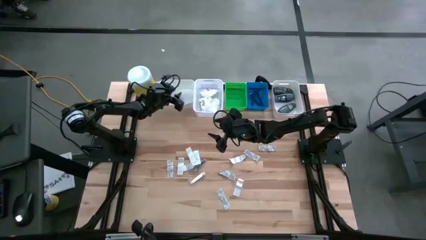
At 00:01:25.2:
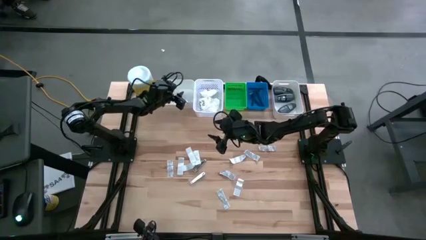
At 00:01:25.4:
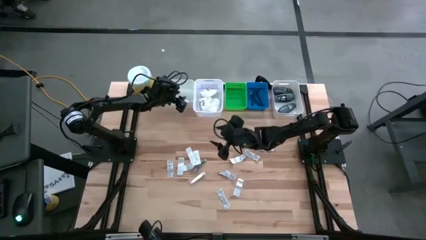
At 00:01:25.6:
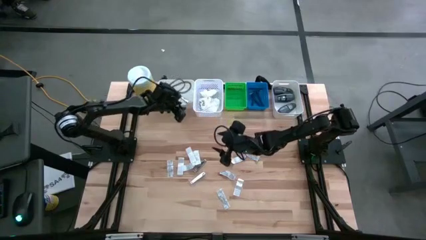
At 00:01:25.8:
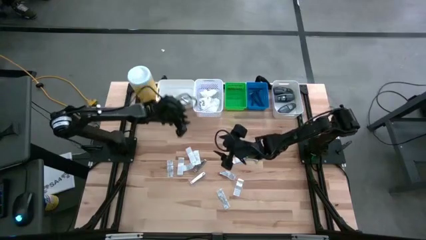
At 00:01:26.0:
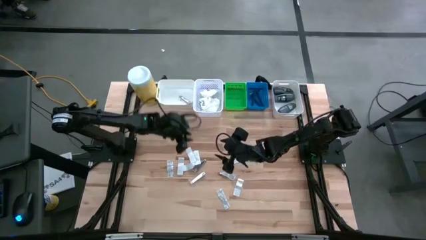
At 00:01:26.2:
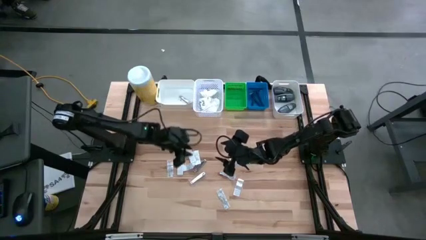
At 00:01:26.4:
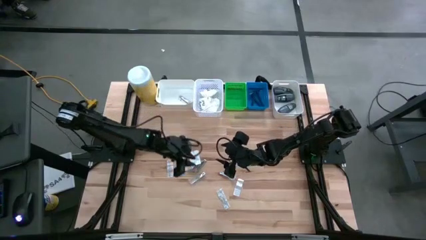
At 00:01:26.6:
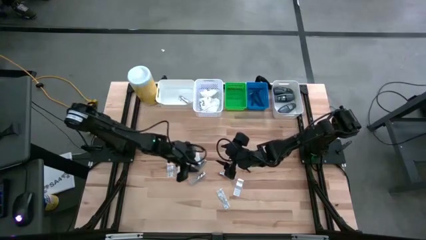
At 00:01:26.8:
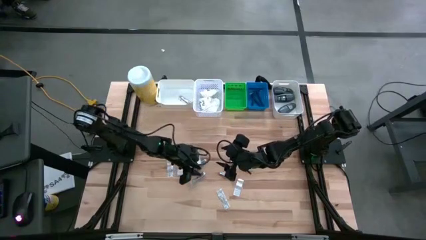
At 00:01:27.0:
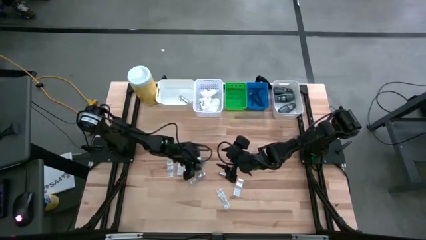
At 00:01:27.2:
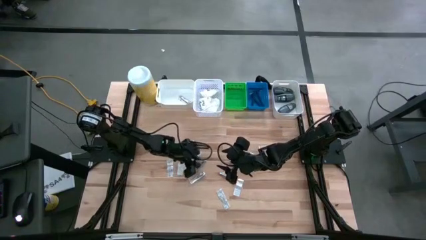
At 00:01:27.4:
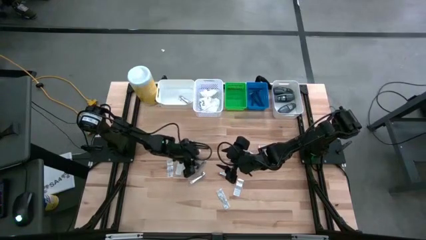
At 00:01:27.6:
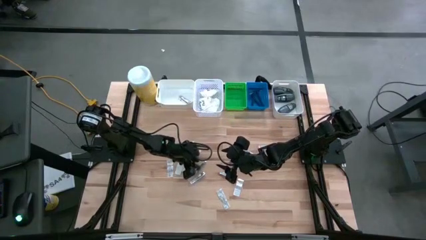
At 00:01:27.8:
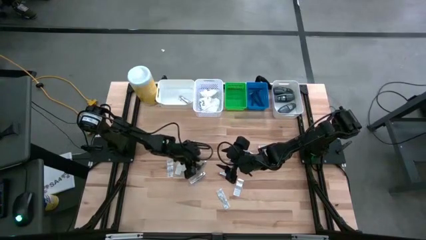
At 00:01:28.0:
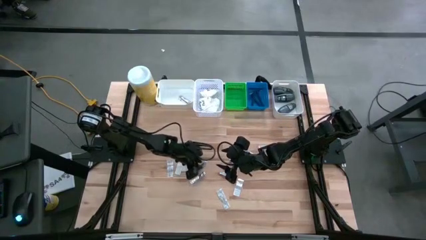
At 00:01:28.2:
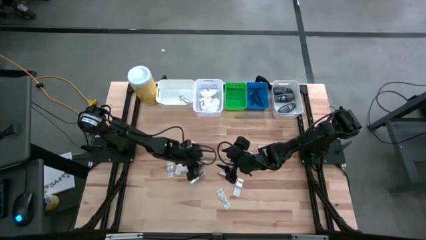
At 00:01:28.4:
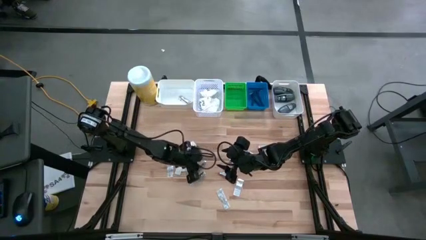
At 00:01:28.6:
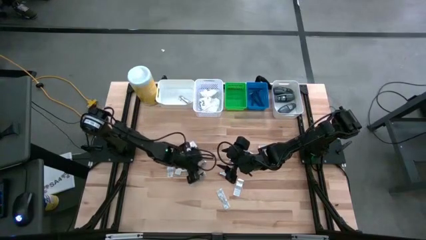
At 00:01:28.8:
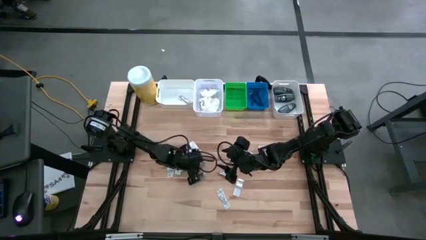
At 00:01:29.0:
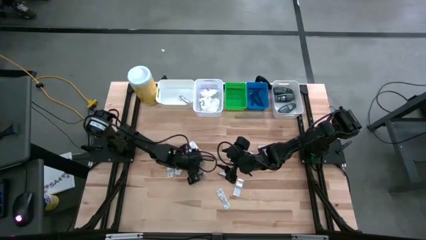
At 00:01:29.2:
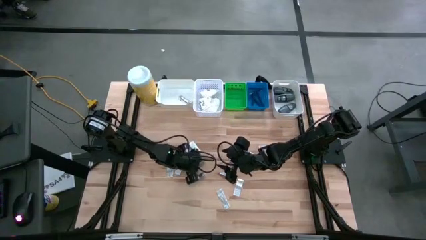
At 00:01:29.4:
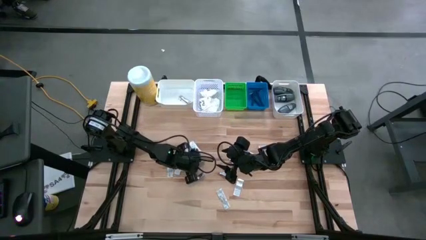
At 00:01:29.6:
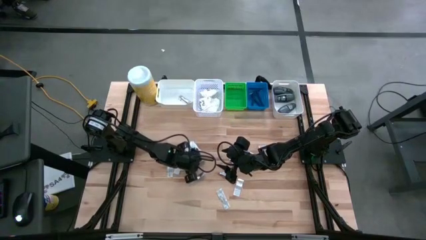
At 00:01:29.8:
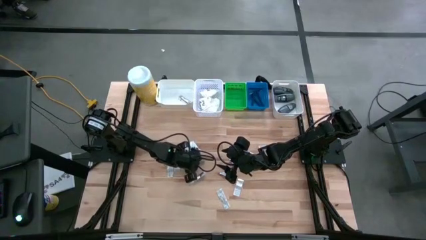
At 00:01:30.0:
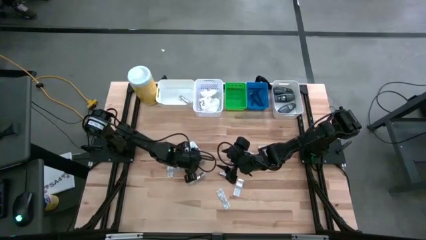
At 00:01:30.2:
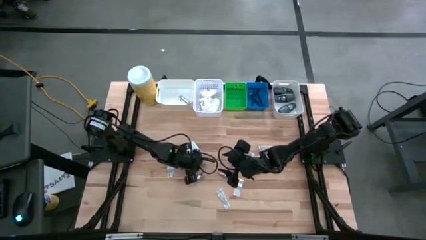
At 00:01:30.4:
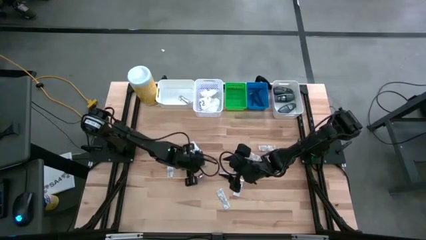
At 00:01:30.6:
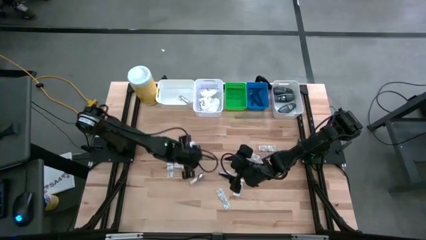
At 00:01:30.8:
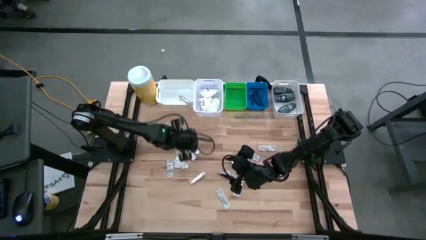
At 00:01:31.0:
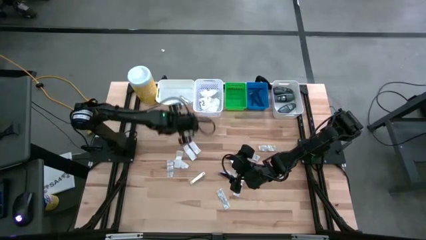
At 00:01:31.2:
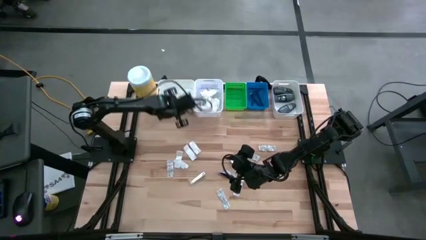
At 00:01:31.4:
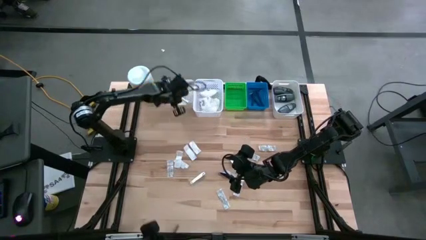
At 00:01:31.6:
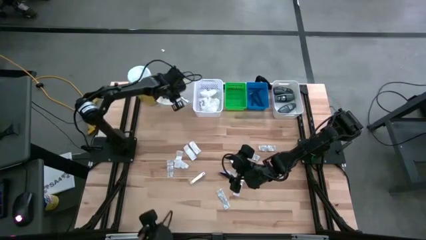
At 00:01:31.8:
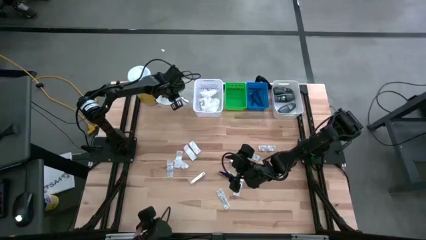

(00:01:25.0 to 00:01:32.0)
Task: Pick & Place Travel size toiletries
Put the silver nail cutter into the left white bin

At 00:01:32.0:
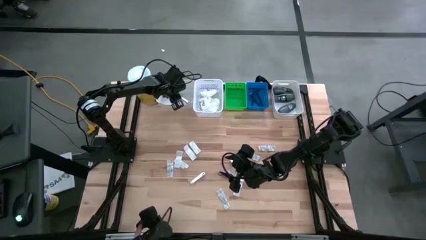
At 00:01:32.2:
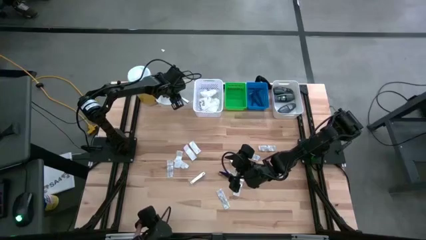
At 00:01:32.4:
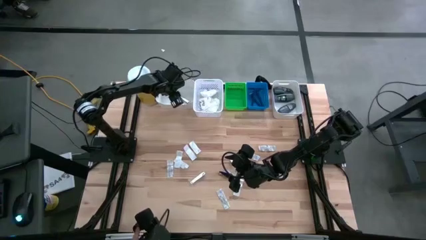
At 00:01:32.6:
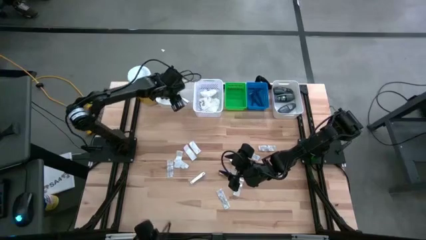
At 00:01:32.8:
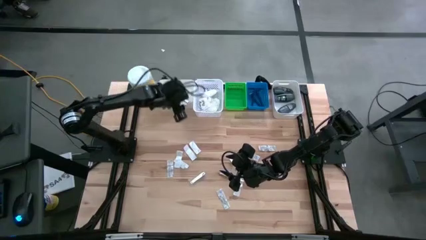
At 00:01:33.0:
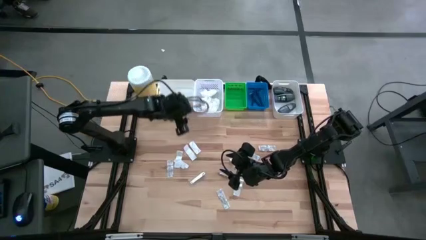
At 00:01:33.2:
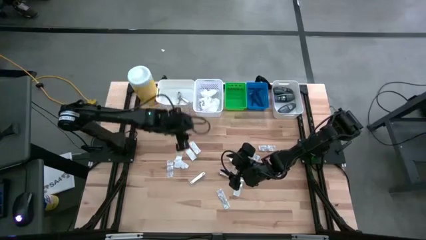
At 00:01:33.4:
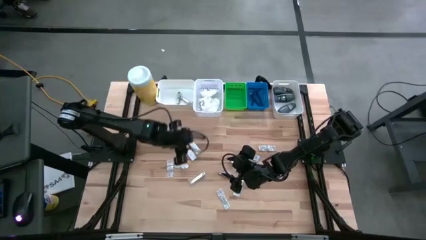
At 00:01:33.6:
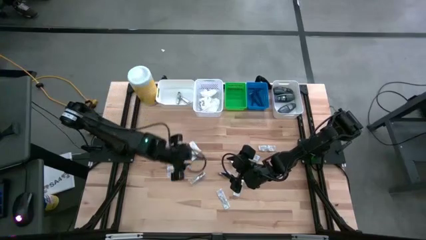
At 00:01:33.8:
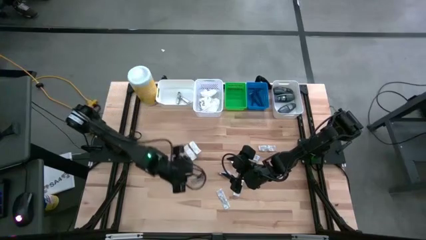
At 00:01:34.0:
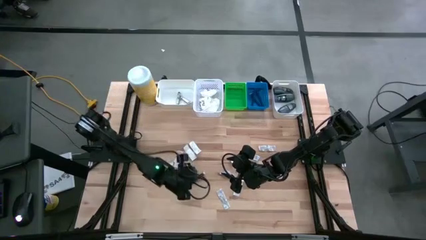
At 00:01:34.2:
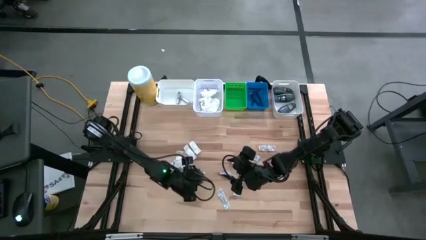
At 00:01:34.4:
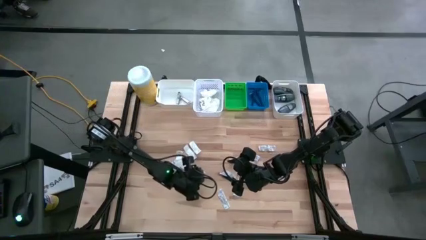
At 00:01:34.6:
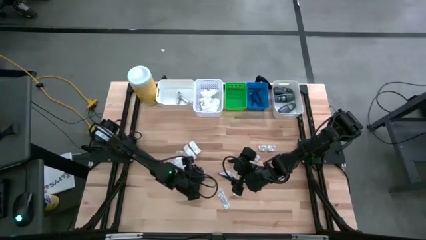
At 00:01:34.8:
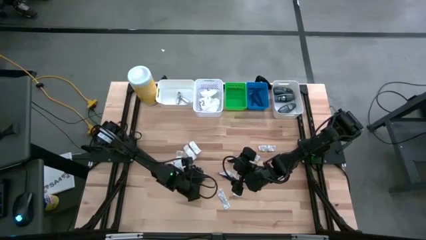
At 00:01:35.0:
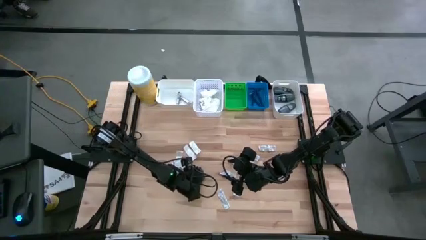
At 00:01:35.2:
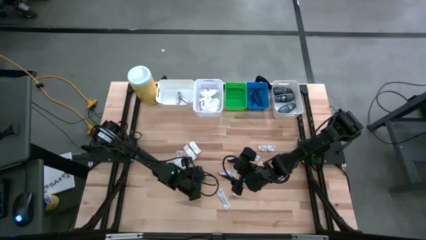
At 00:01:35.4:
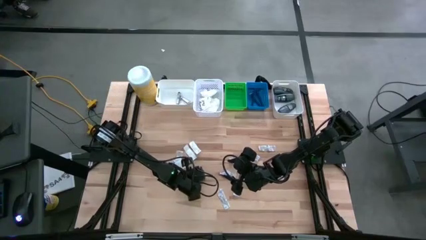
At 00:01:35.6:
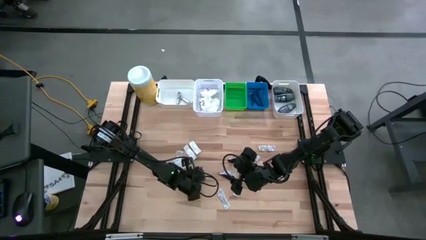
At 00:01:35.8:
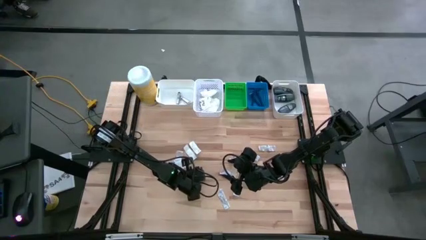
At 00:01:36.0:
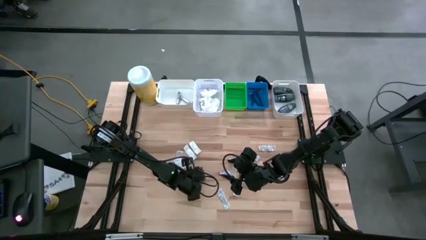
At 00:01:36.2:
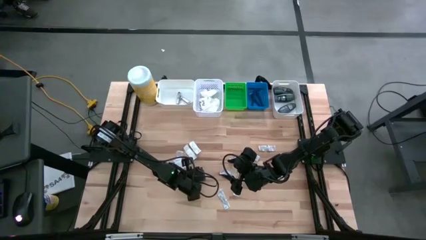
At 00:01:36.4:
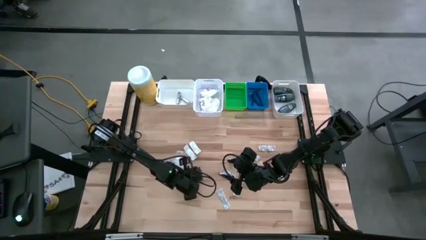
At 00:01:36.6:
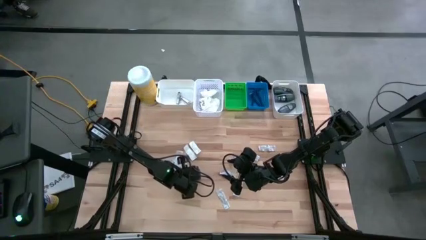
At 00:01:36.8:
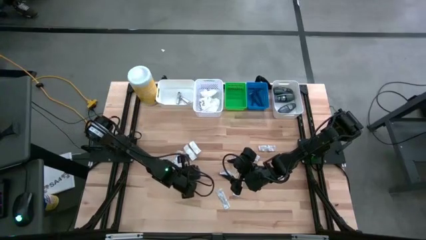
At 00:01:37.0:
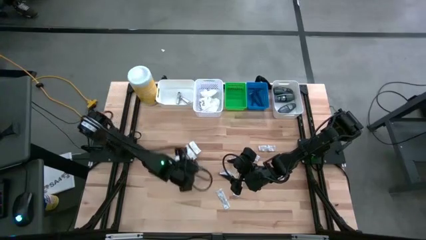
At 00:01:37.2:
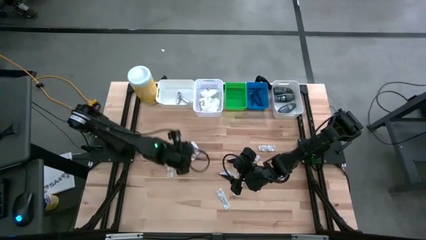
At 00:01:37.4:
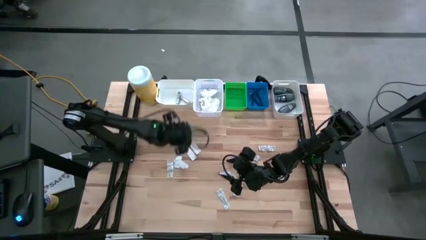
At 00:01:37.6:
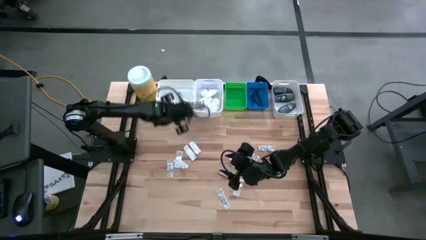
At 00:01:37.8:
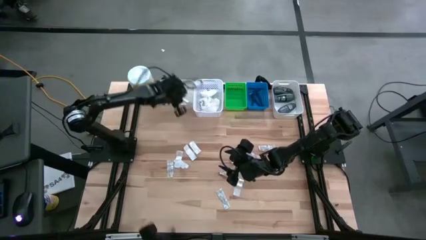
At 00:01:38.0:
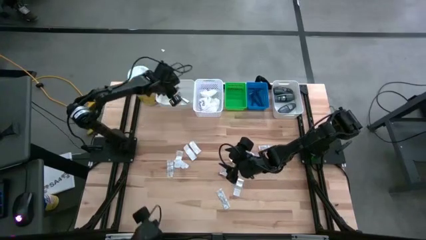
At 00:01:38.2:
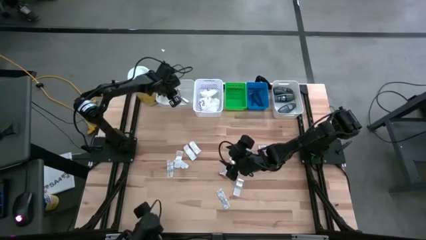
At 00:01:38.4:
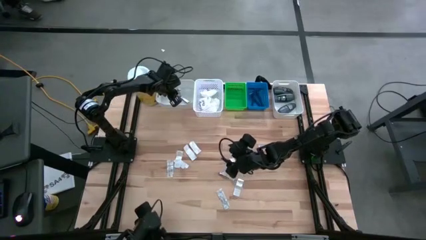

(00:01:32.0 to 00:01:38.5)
Put the silver nail cutter into the left white bin

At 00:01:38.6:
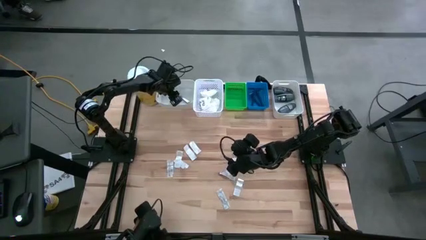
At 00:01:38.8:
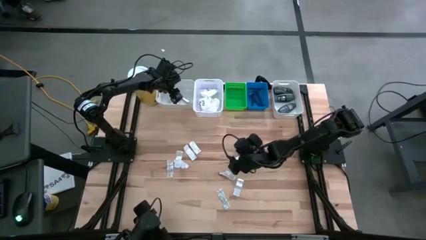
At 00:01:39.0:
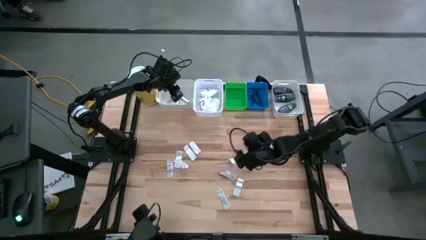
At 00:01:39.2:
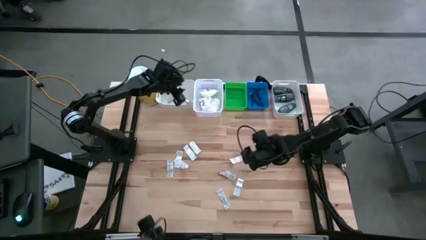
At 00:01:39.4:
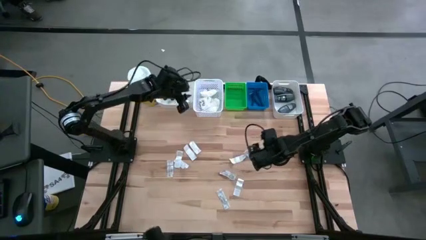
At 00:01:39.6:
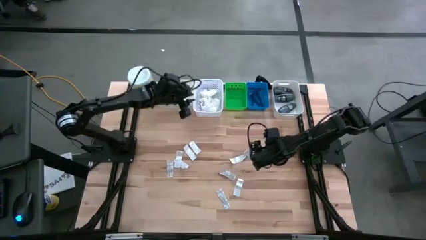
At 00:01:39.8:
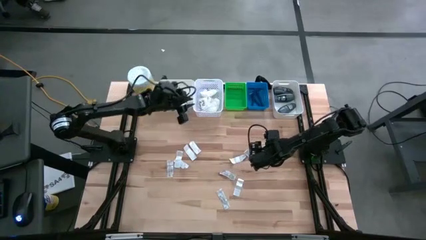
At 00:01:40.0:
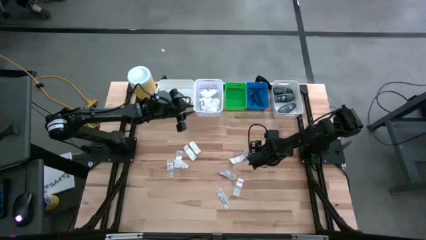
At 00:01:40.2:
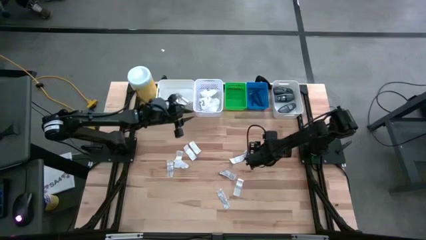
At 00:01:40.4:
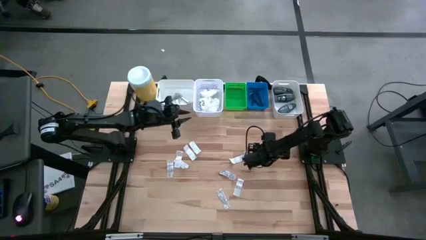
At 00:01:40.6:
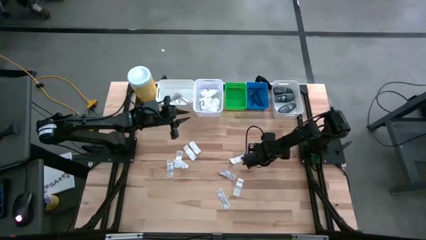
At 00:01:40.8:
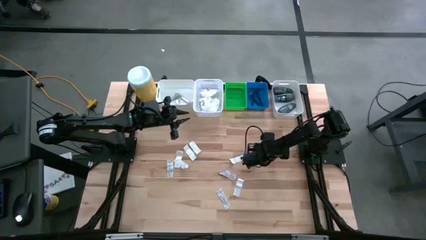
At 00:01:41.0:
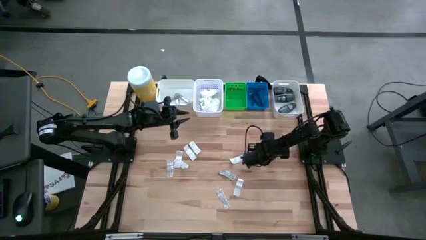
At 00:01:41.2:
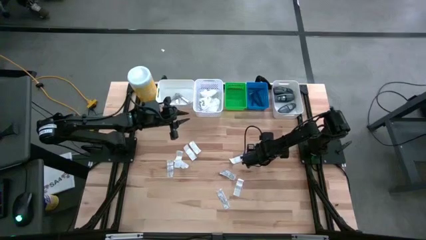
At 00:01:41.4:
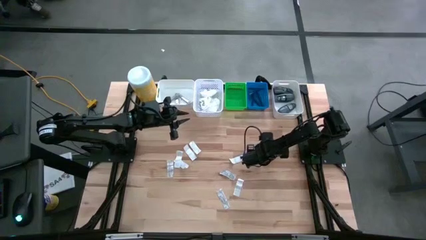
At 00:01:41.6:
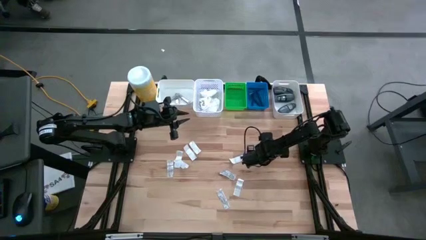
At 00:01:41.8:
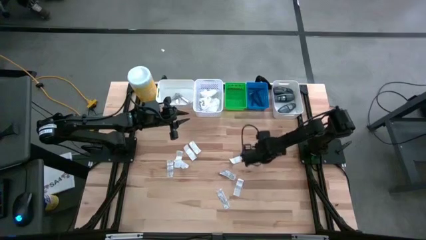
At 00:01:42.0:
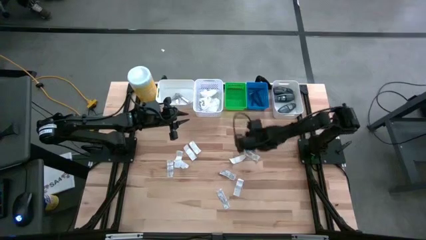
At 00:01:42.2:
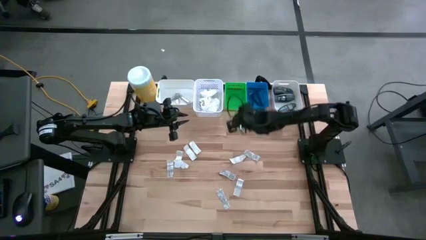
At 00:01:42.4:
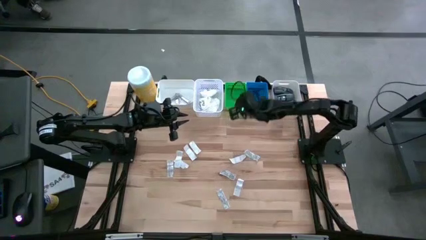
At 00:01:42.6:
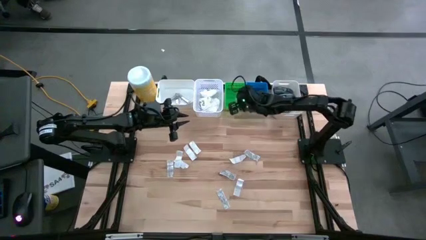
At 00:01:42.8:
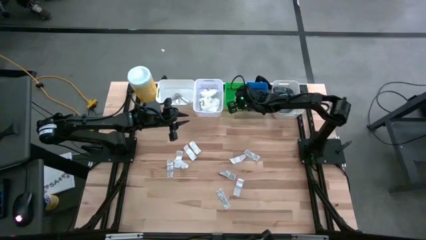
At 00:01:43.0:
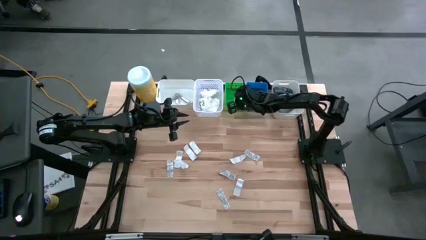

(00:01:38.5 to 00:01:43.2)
Put the white bandage into the green bin
